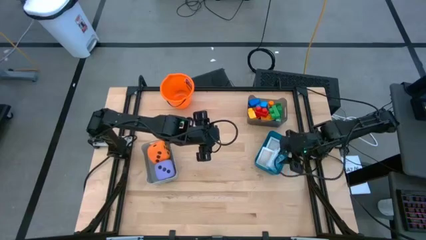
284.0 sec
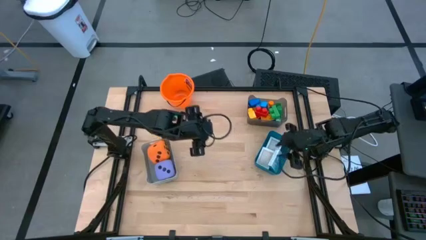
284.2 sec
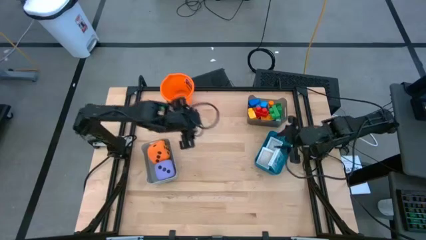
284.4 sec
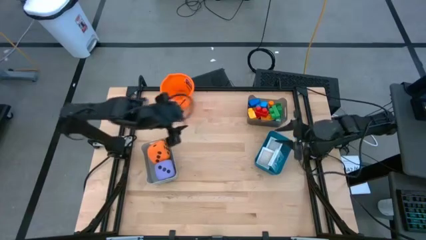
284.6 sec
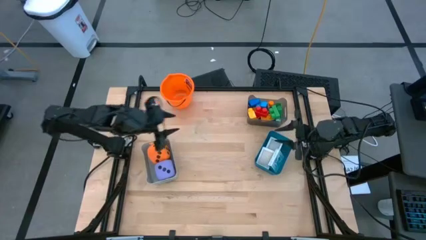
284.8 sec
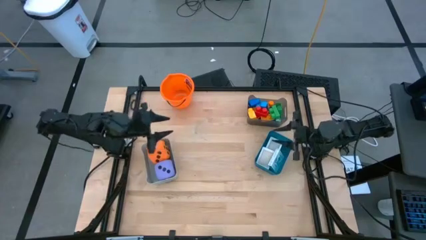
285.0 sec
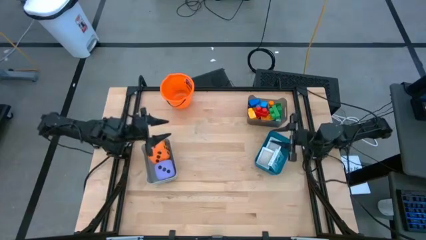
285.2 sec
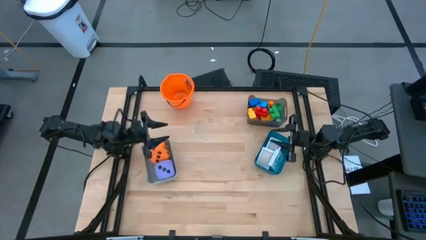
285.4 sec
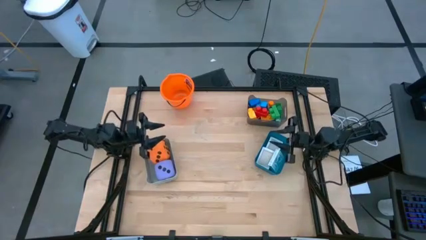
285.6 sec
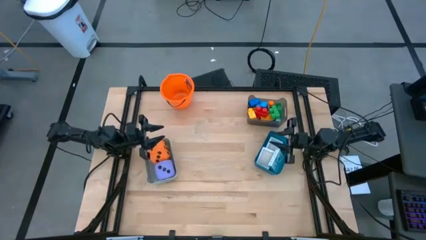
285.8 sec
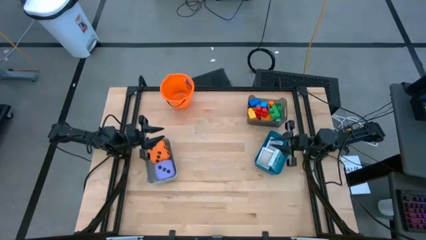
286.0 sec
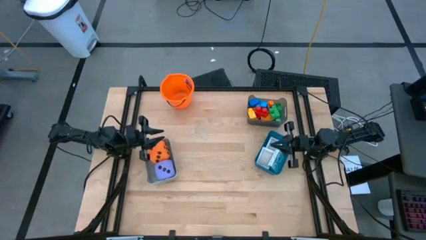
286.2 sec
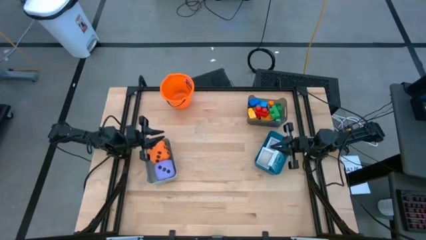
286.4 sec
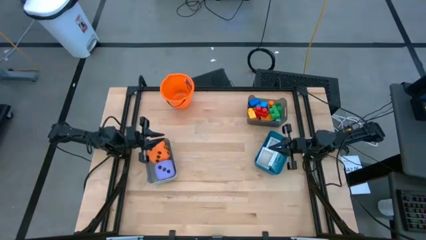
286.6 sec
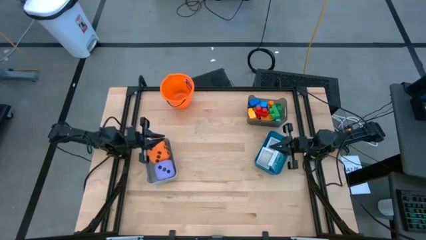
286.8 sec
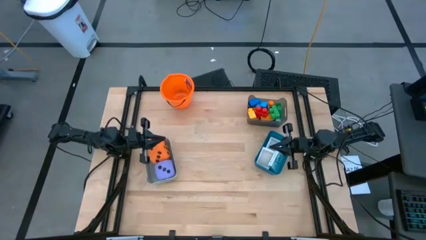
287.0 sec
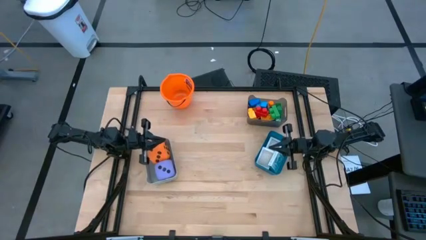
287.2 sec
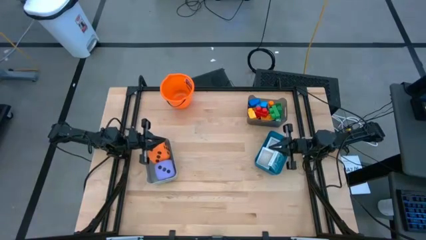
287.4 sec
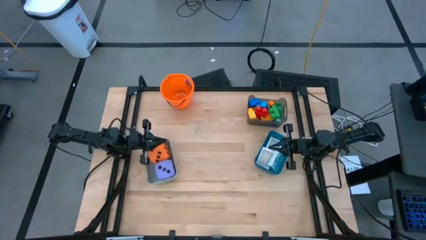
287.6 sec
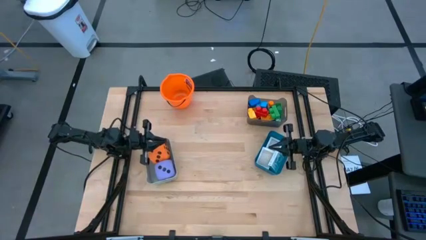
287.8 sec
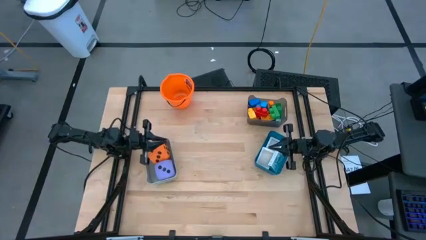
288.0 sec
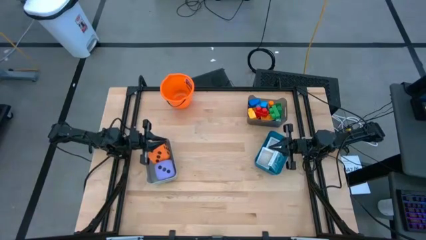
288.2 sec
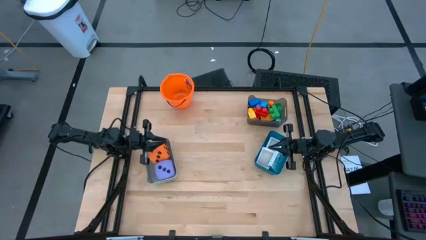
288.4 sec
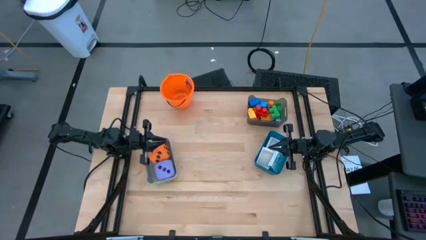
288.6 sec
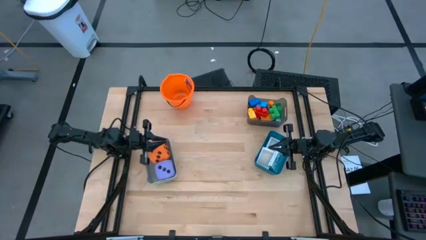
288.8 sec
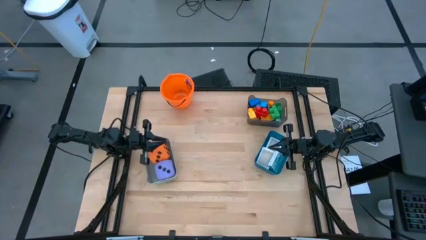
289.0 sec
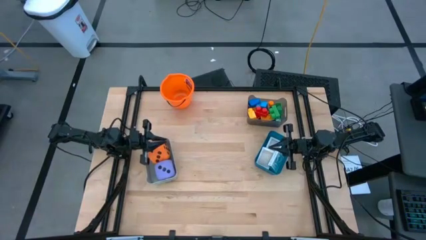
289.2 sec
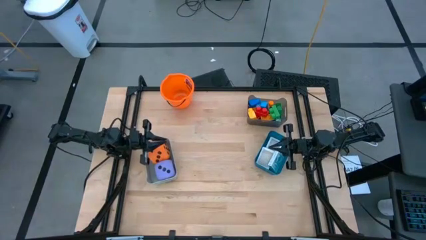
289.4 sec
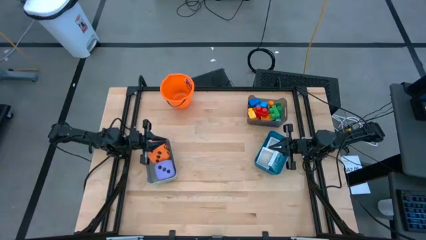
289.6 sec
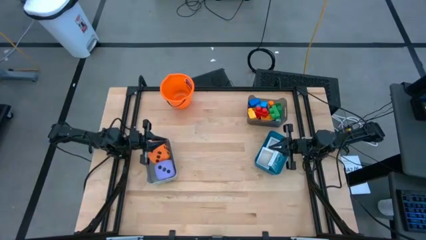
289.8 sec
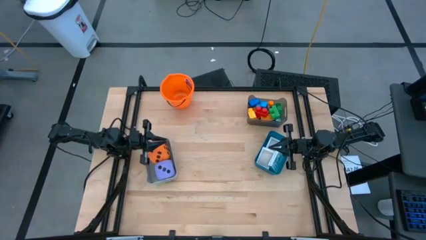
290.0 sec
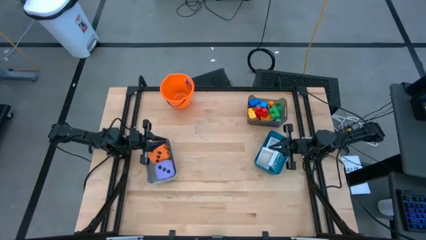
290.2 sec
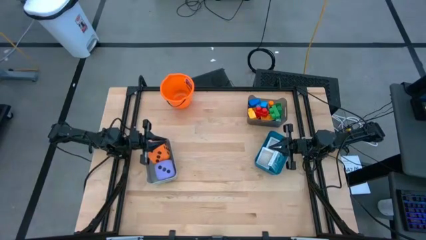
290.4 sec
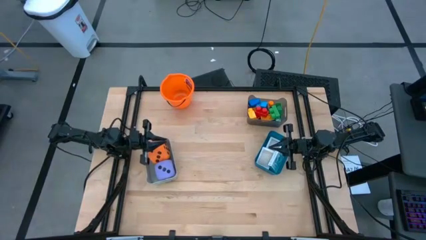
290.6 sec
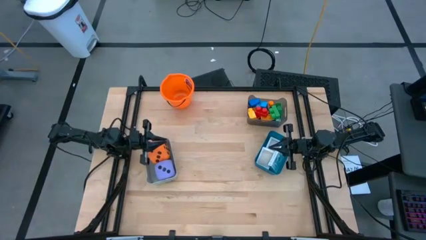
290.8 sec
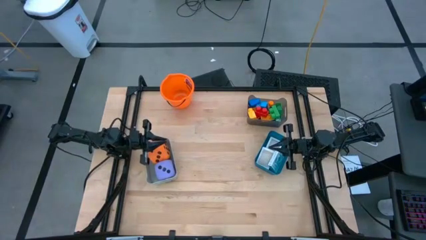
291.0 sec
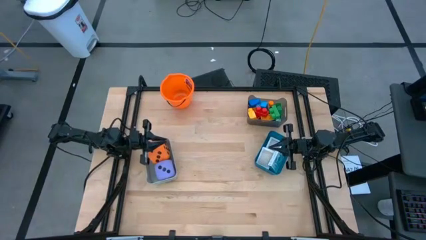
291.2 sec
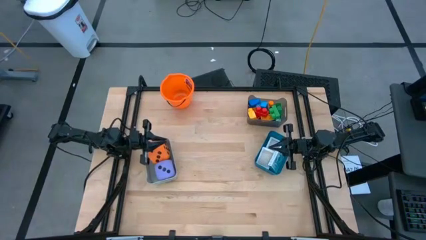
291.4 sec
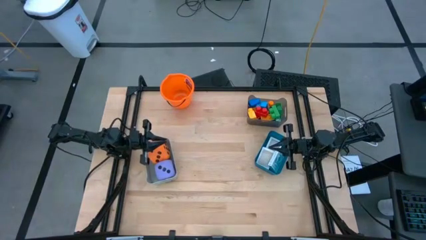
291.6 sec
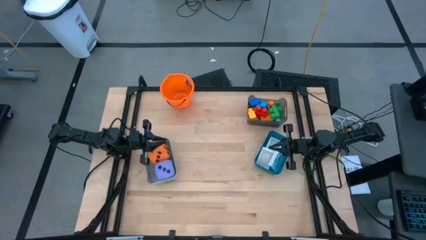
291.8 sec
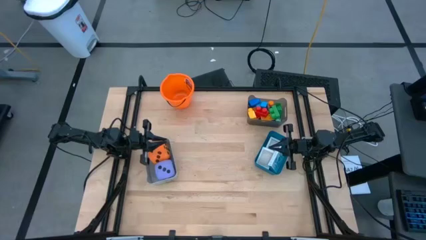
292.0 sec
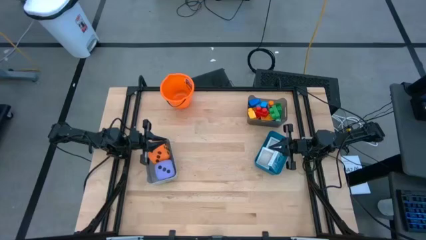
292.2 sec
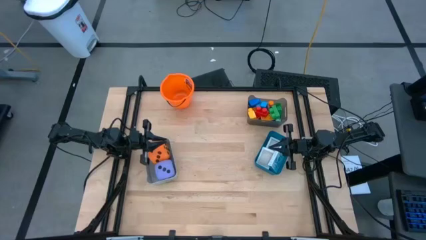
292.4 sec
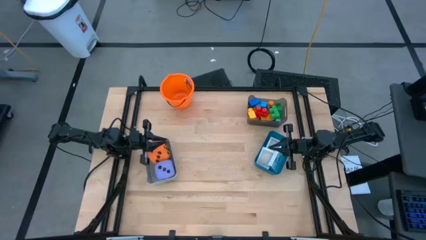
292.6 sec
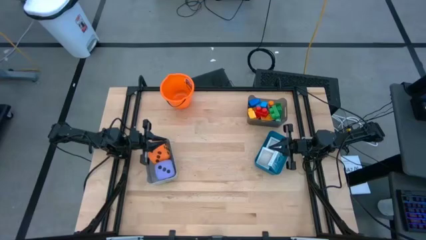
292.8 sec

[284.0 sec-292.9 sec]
Task: Pick & Place Toys
Return to Home Position

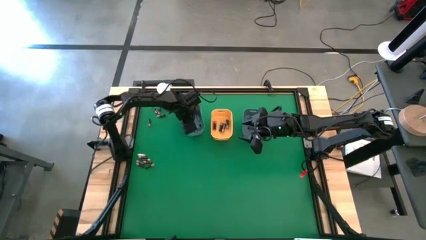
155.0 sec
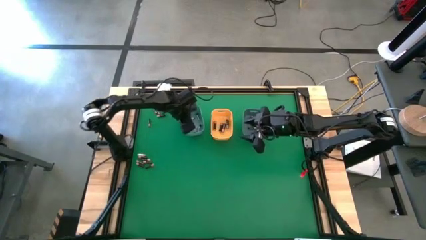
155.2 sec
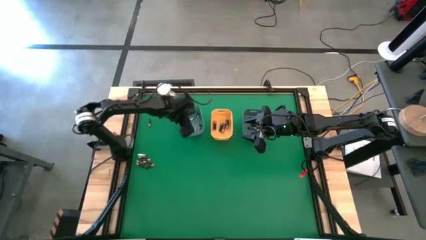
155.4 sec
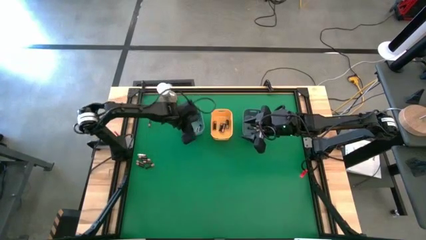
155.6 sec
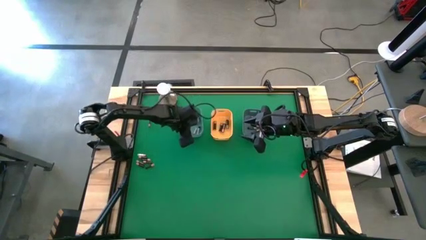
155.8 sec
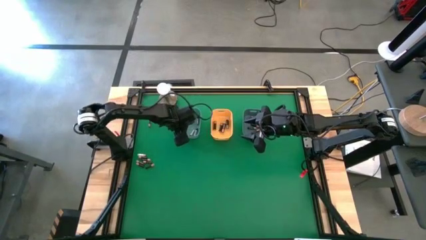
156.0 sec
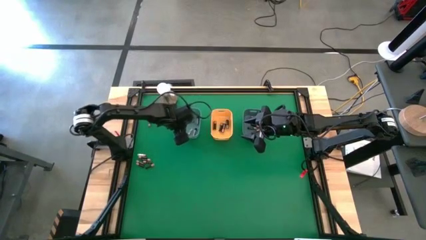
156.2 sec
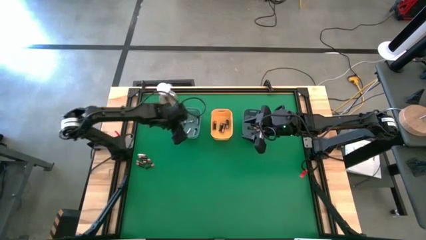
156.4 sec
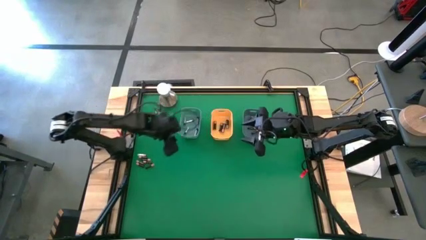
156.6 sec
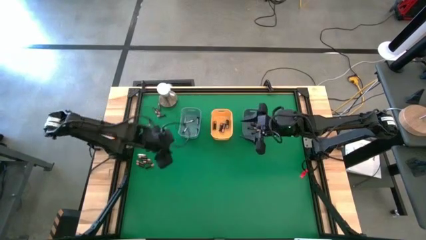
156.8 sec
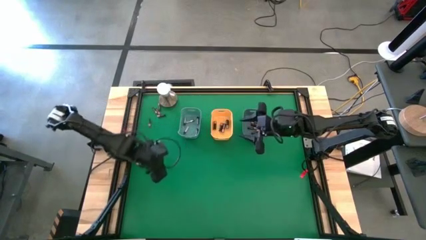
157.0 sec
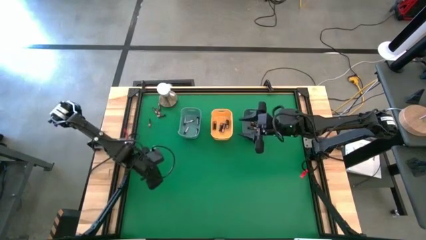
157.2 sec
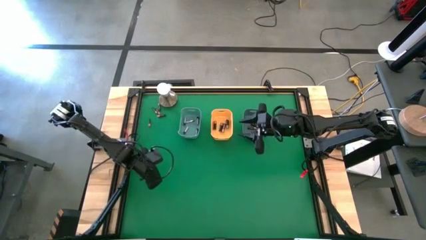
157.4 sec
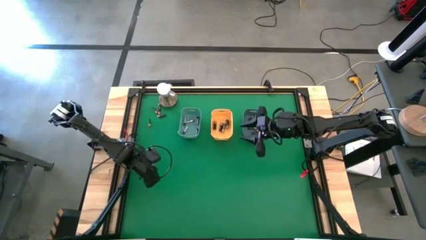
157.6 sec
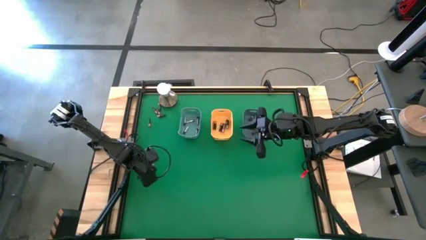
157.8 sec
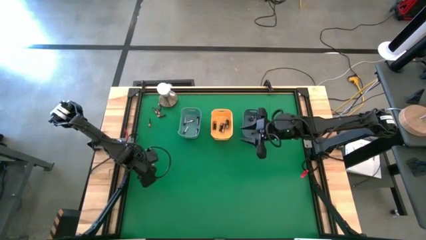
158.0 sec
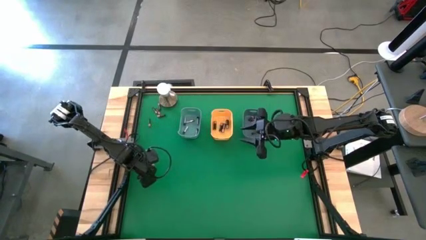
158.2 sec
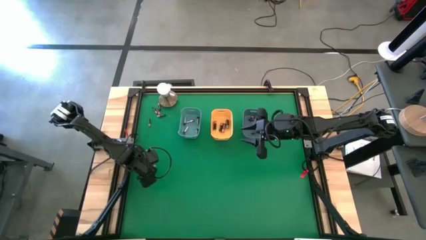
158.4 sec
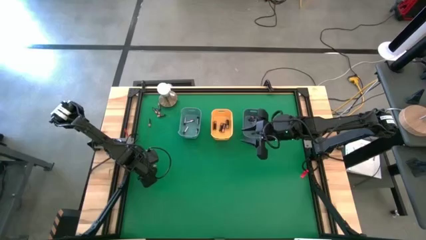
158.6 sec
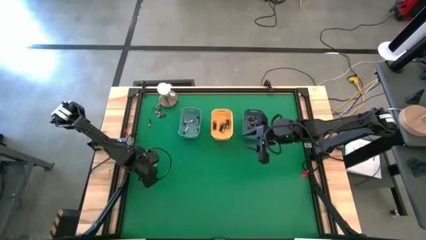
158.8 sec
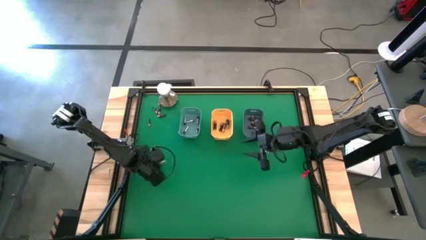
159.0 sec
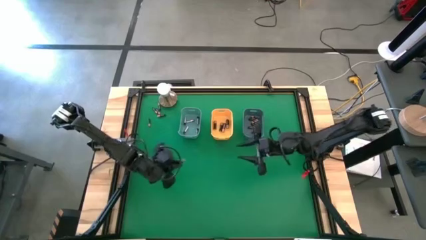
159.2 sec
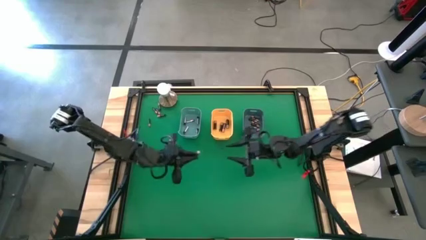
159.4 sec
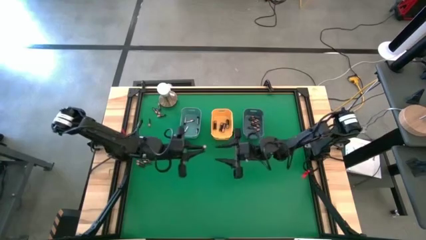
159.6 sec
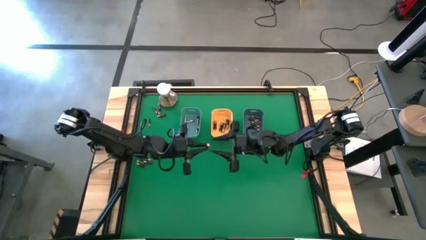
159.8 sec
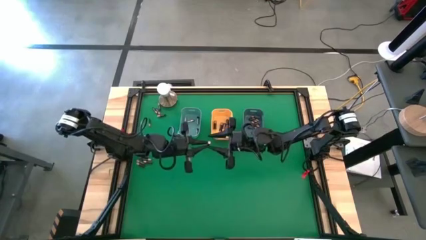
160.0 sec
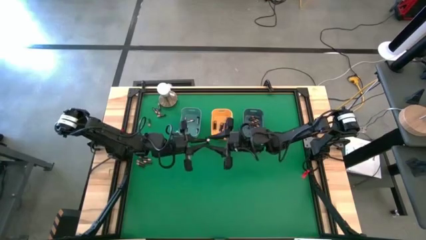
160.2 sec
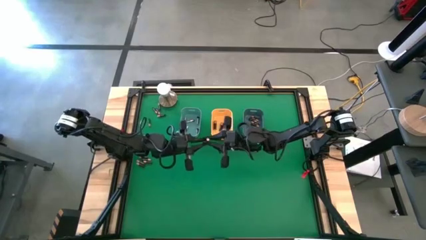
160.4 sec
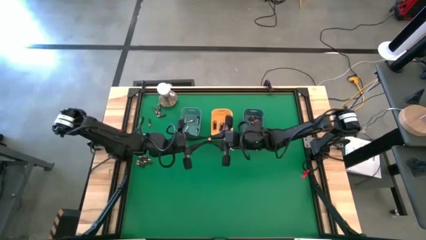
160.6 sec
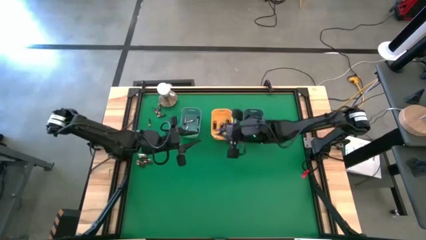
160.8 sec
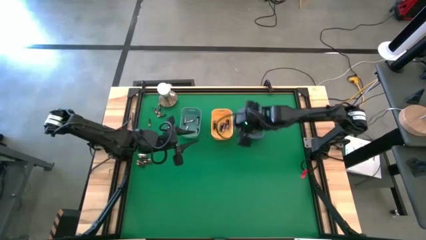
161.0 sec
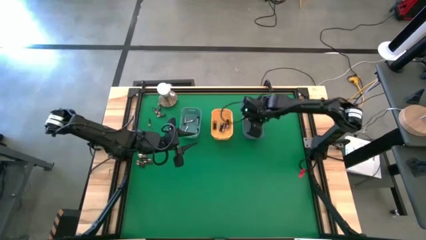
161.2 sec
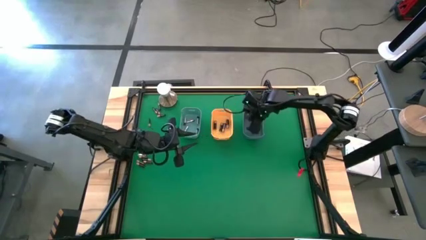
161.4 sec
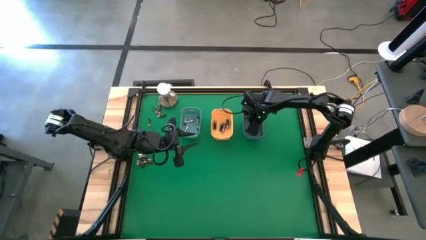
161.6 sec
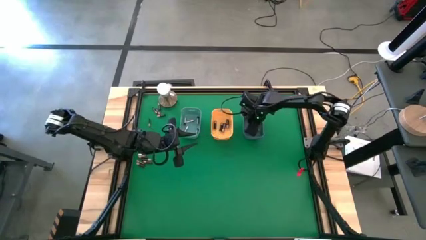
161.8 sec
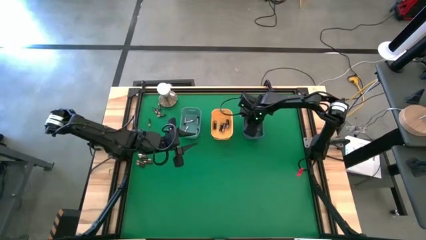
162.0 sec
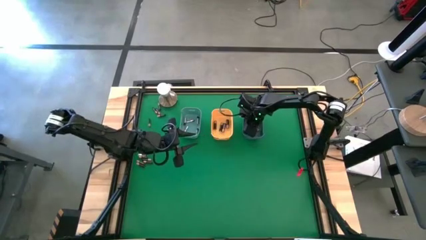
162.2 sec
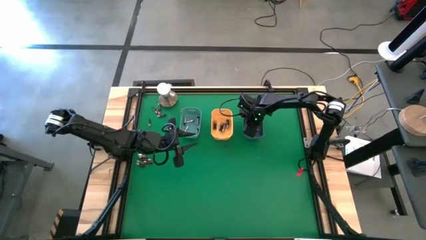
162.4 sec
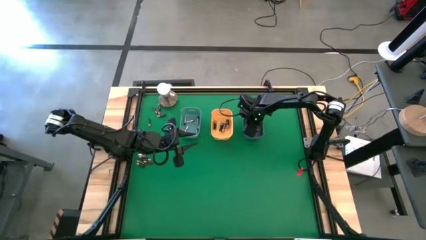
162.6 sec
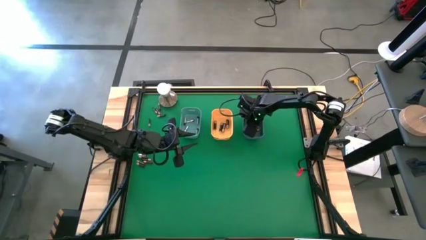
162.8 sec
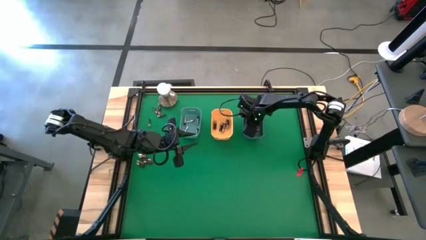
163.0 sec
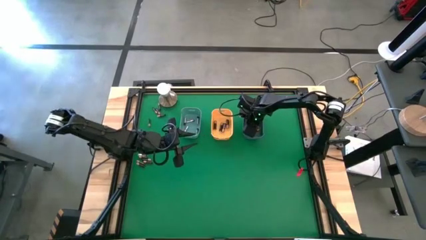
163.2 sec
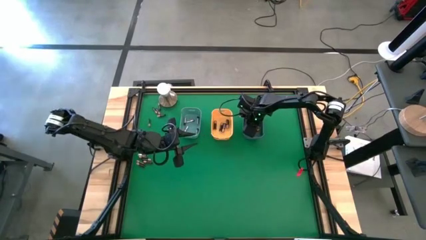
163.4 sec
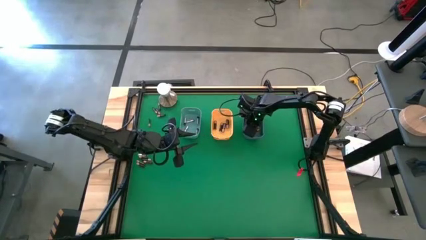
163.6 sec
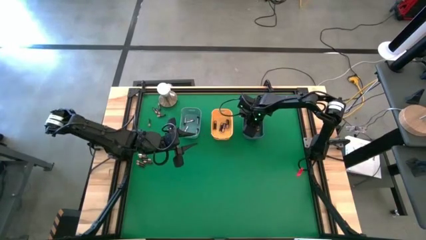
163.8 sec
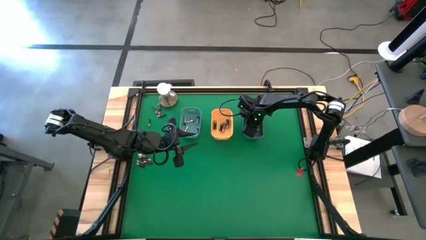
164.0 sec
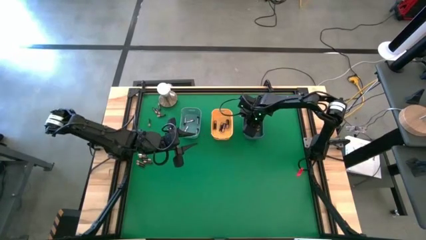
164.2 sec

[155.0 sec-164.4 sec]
Task: Sort batteries
Put the small black battery into the blue bin
